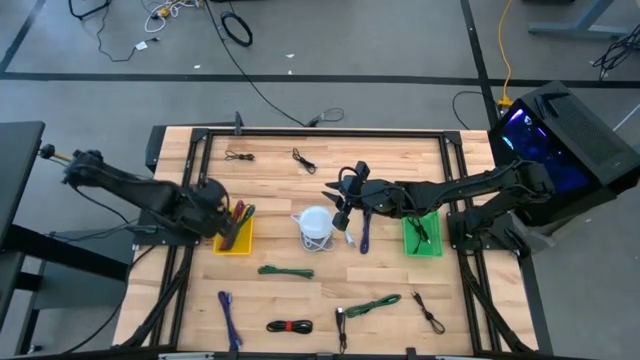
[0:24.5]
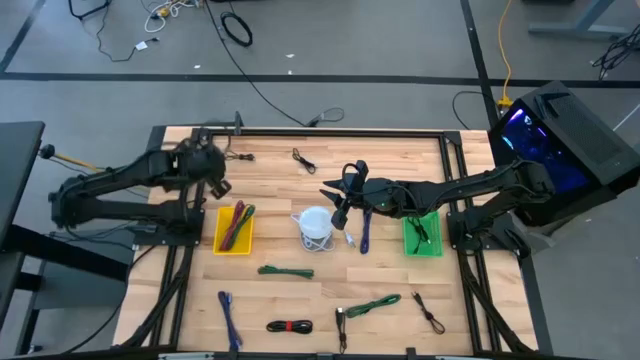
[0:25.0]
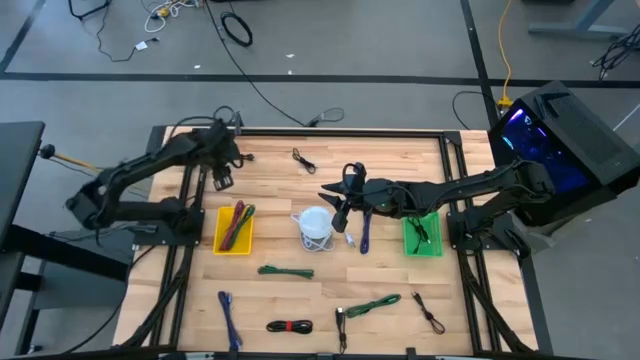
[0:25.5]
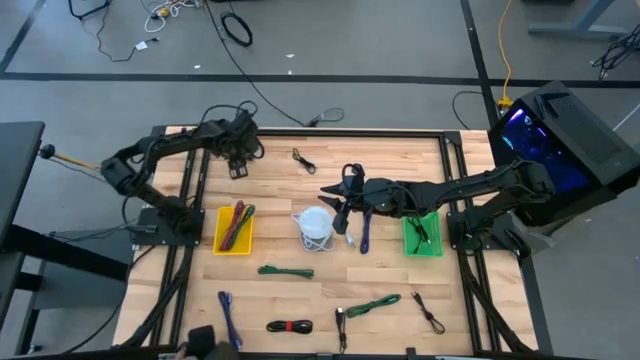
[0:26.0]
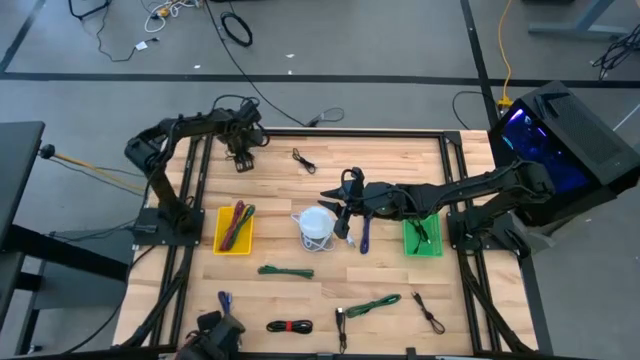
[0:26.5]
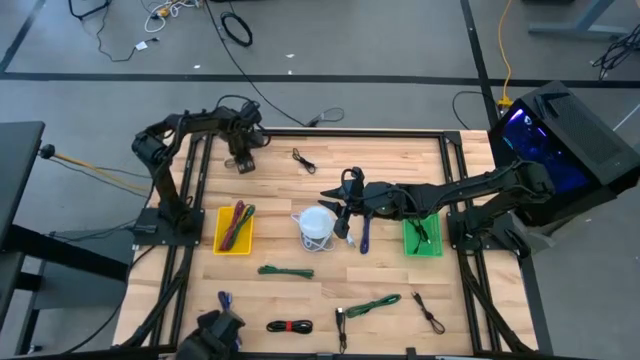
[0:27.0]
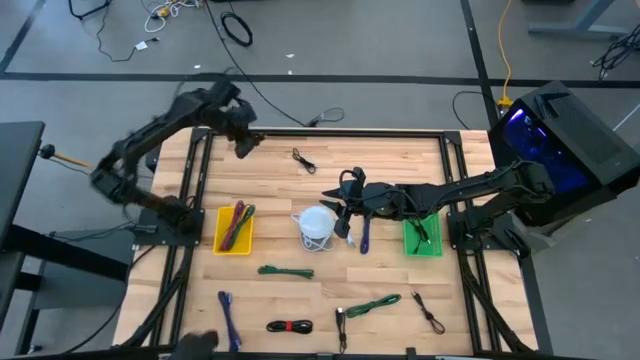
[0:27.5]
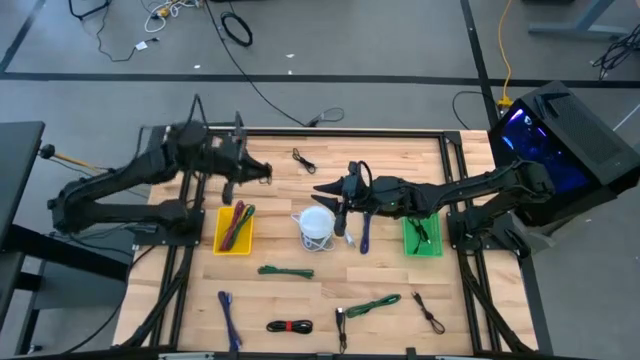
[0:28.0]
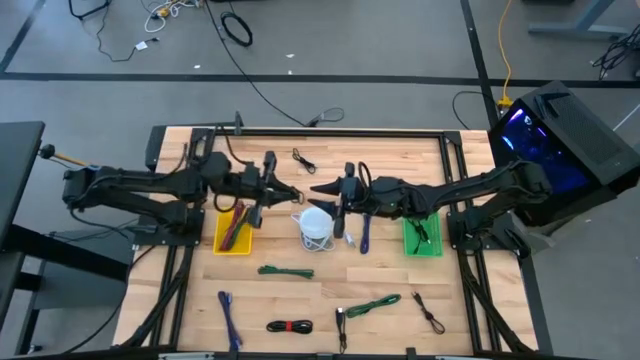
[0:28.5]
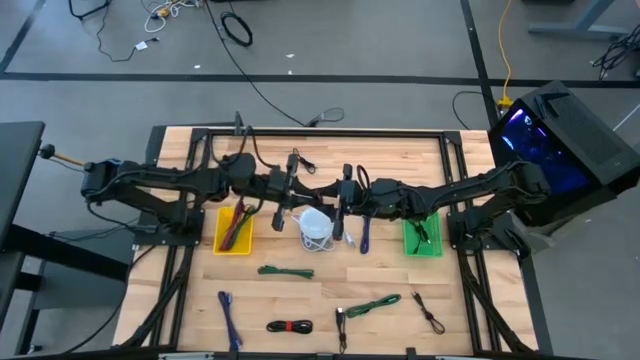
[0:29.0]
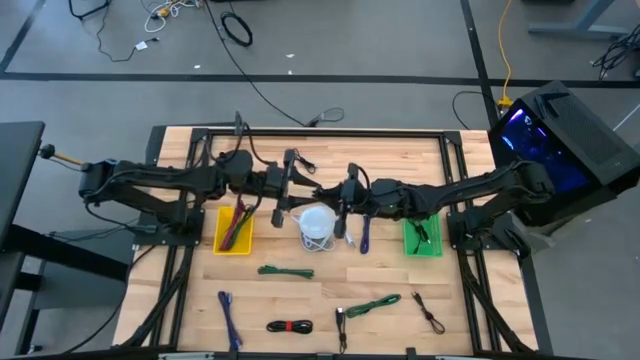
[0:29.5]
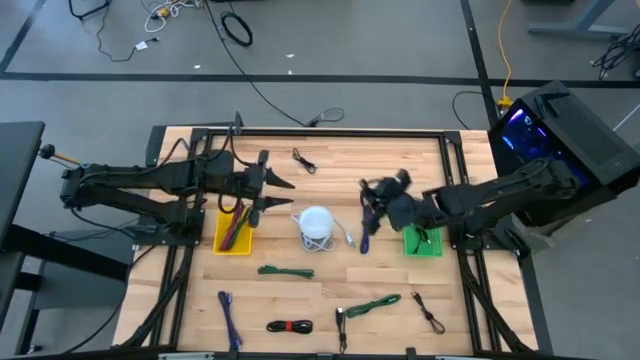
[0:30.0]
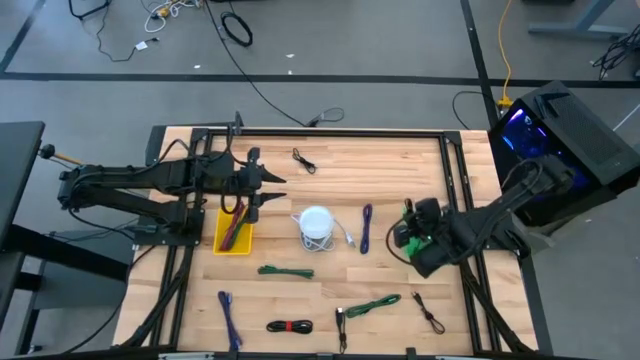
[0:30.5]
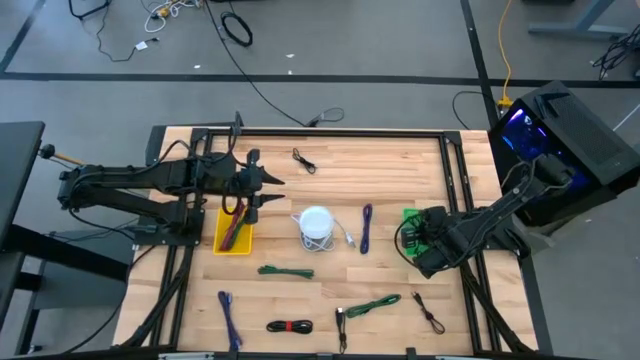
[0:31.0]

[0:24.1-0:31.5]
Task: Pick & Place USB Port
Put the black charger cable into the green bin

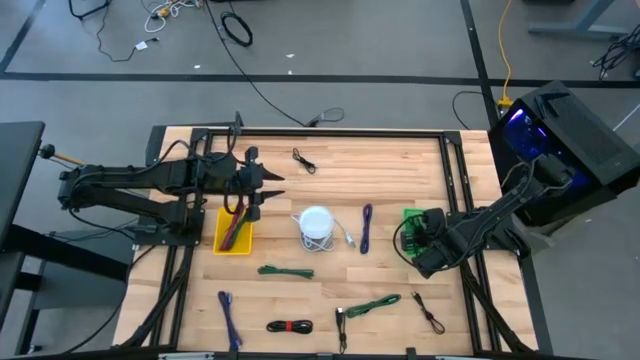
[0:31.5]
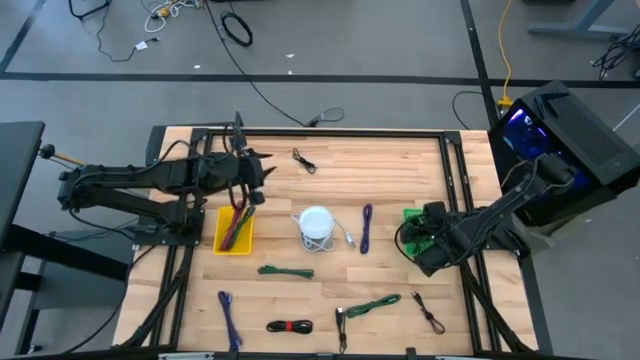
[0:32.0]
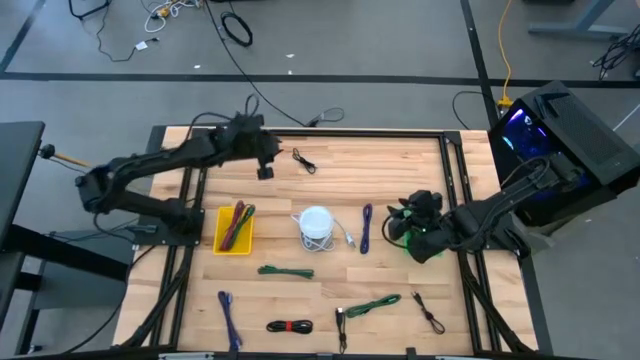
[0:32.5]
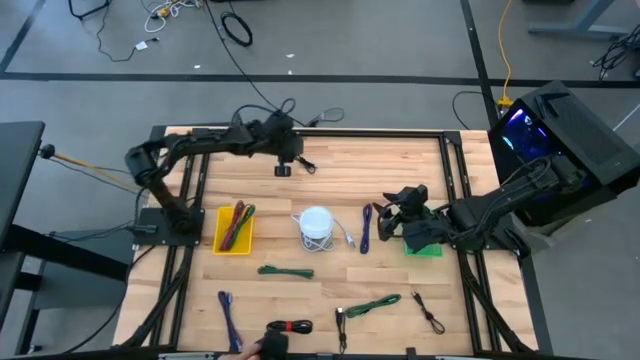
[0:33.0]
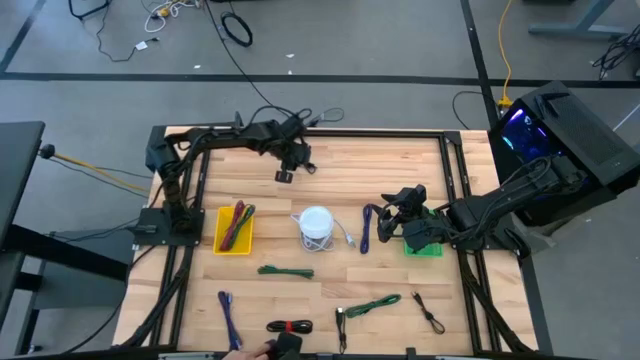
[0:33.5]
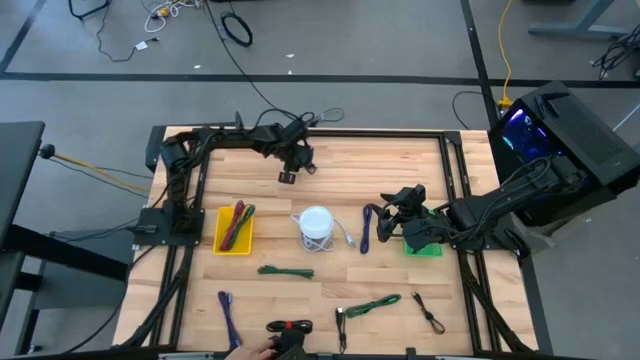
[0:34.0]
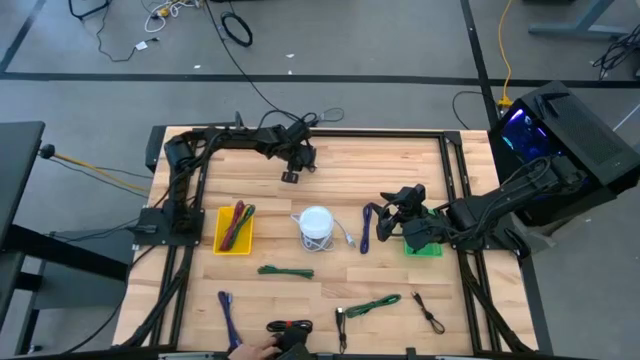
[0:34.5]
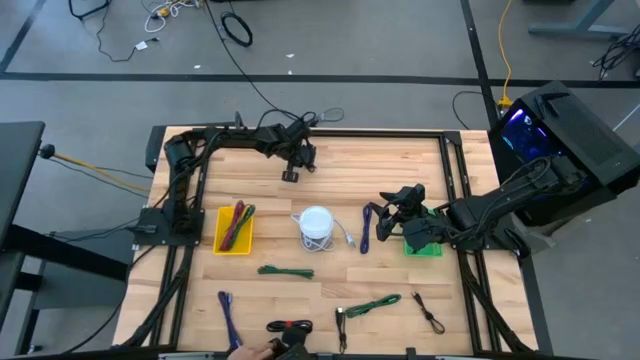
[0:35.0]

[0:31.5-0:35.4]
Put the black charger cable into the green bin

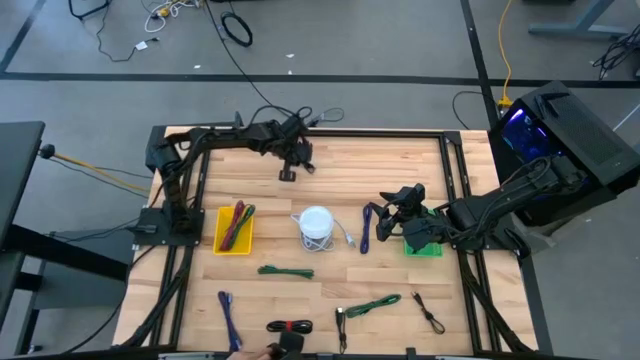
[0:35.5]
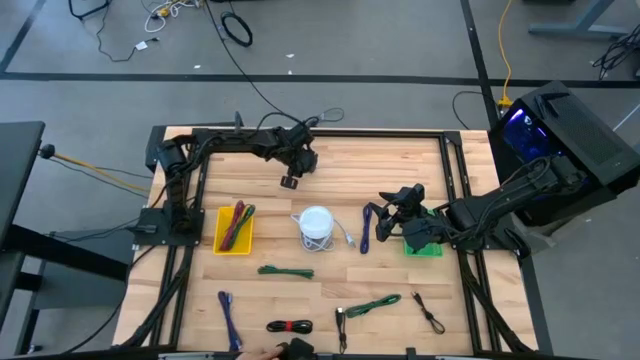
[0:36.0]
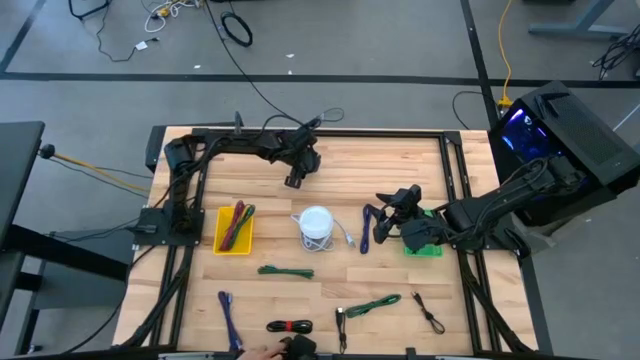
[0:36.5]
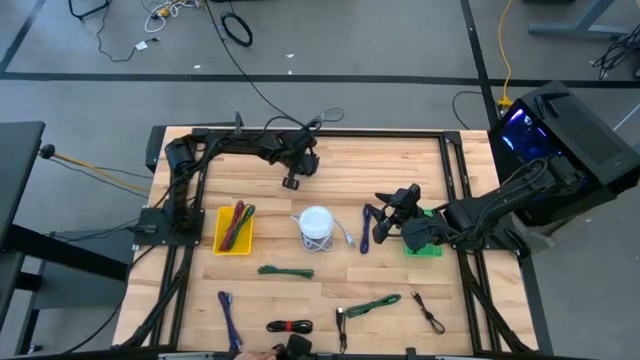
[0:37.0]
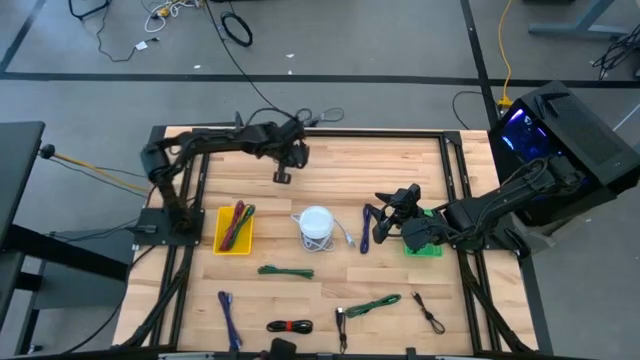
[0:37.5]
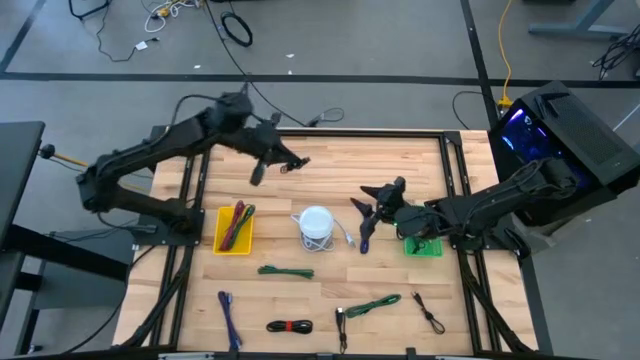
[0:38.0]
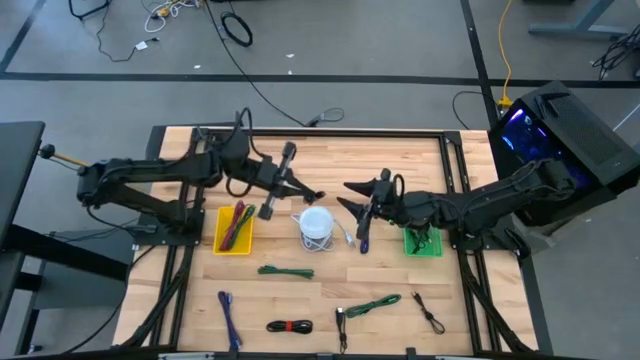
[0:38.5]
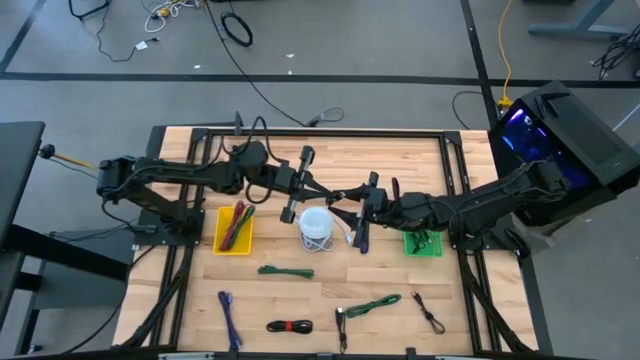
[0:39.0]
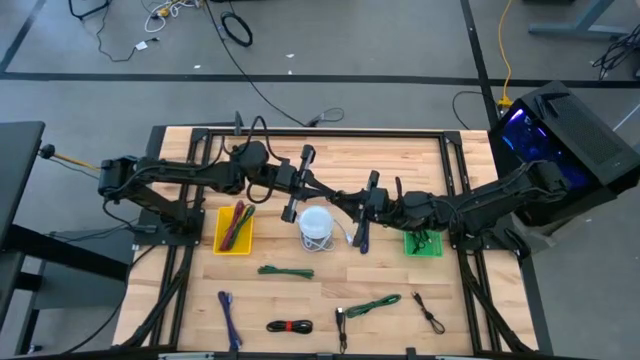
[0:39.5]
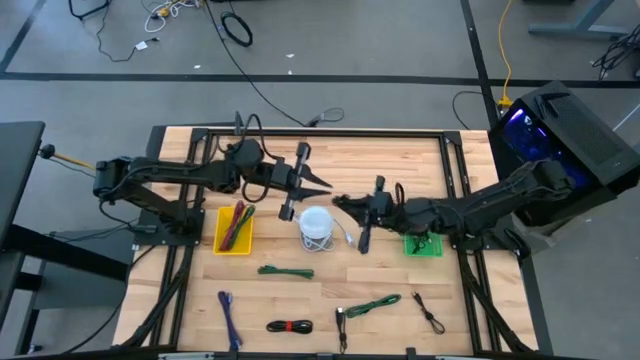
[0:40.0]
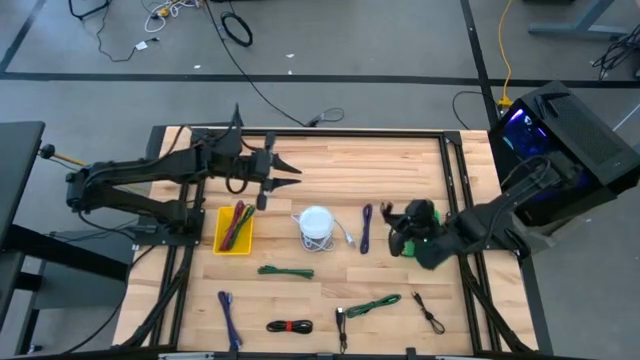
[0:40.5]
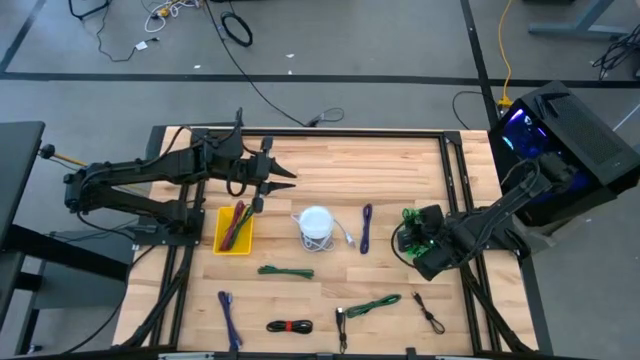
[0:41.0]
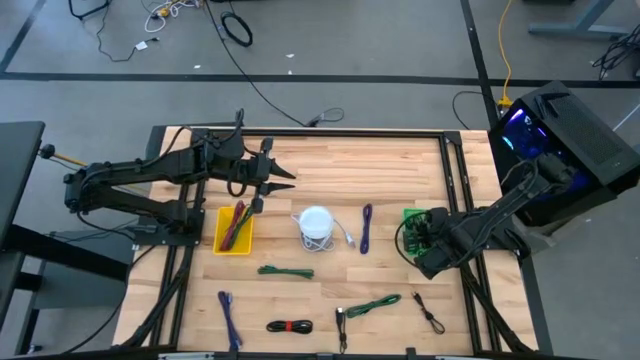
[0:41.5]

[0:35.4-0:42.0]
Put the black charger cable into the green bin

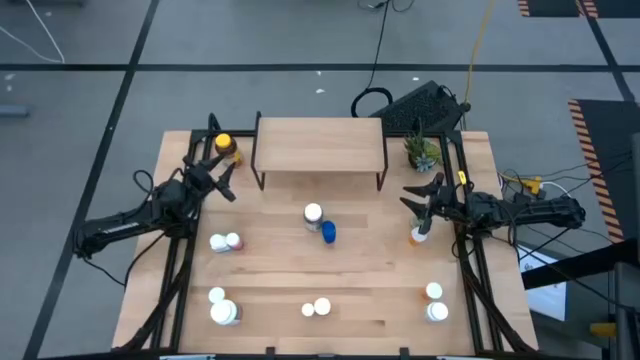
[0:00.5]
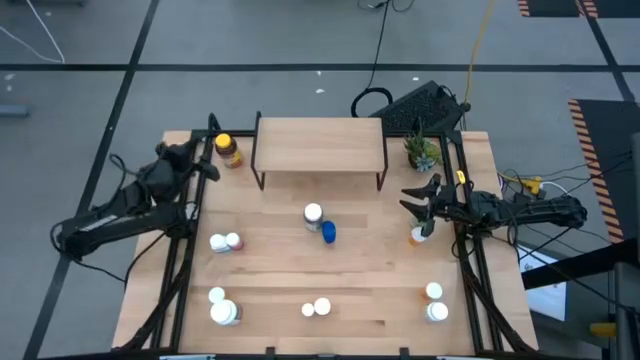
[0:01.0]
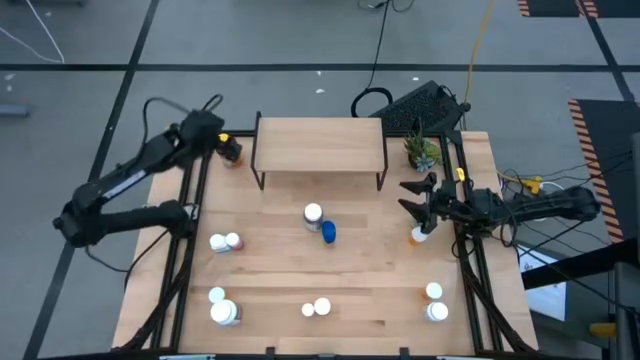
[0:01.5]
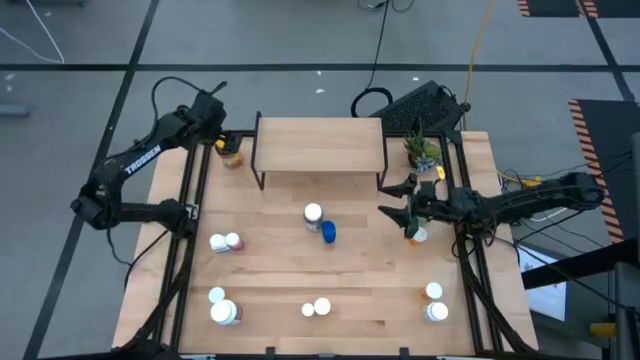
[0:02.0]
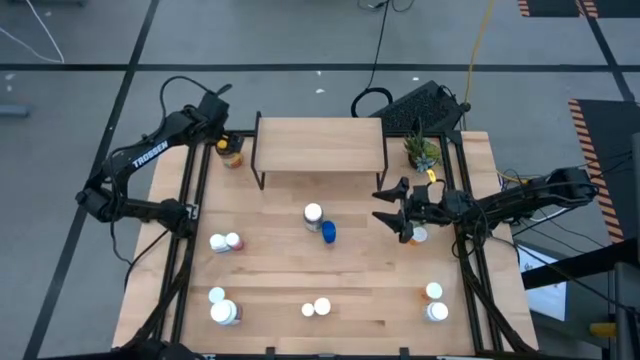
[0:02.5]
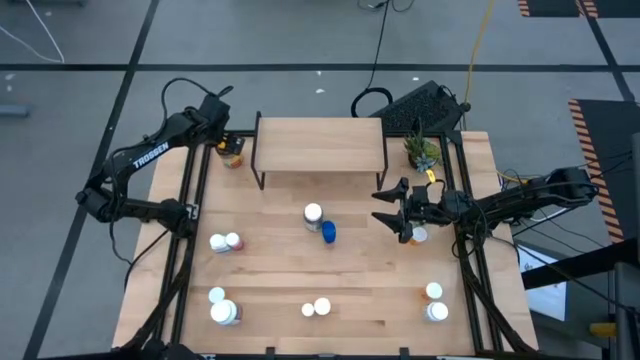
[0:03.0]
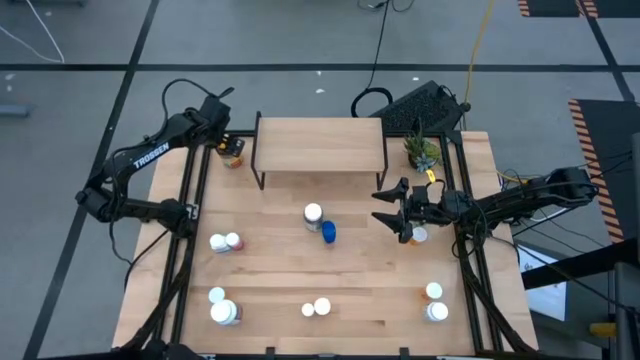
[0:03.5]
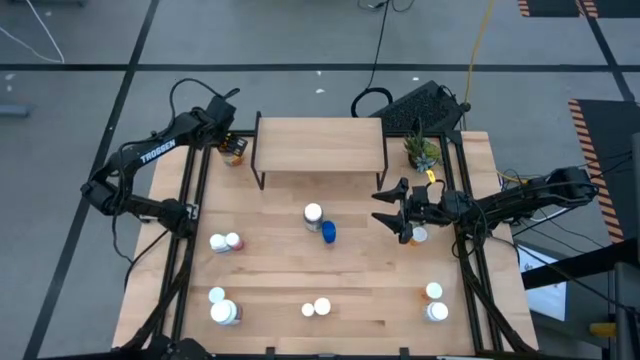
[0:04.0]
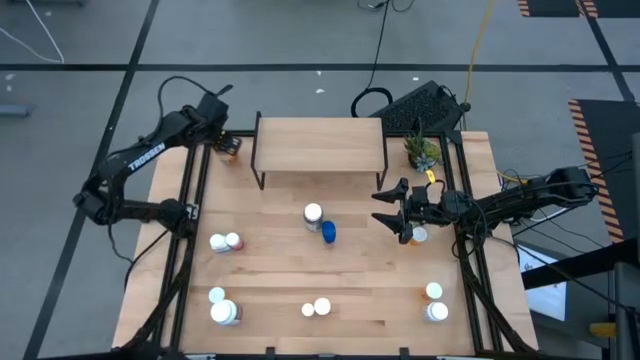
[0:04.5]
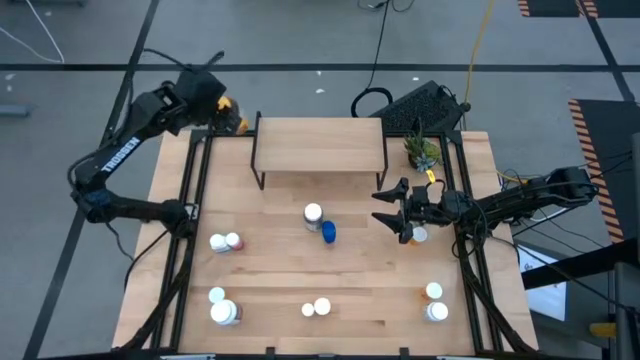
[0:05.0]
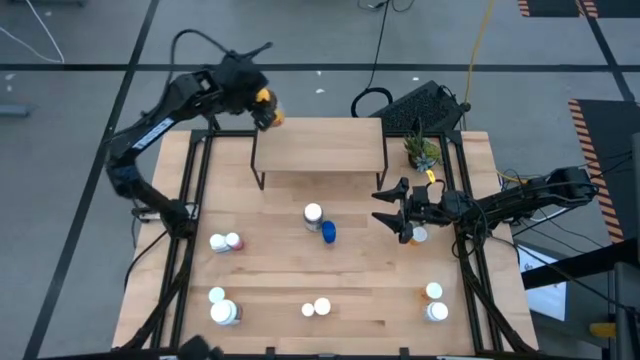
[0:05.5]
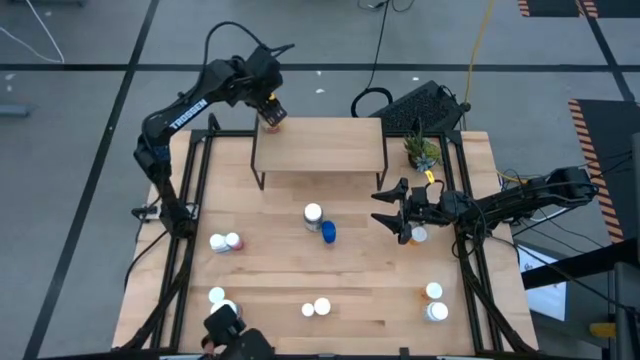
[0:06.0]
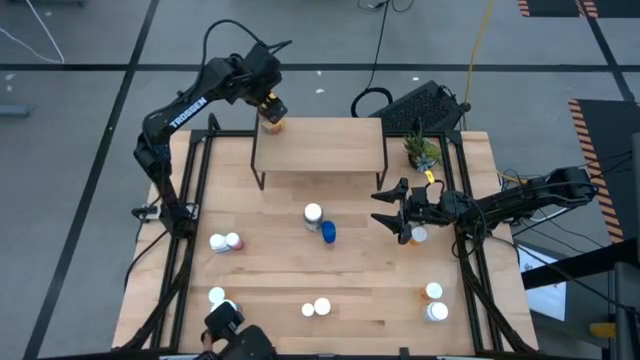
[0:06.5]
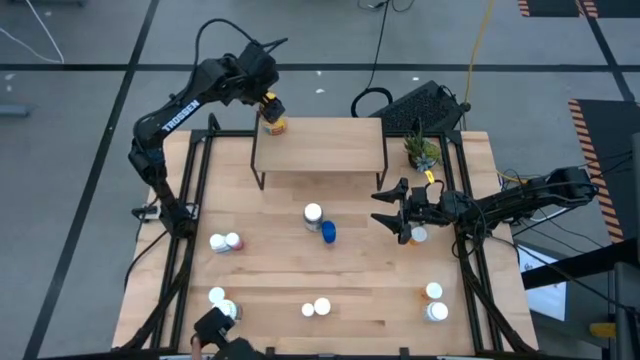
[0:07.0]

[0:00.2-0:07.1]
Task: Pick and place medicine bottles onto shelf by color
Put the large yellow medicine bottle on the shelf
